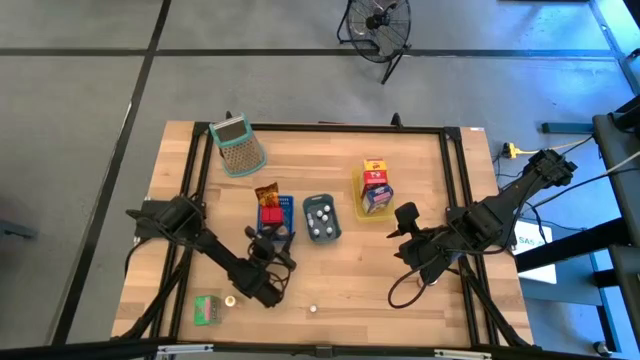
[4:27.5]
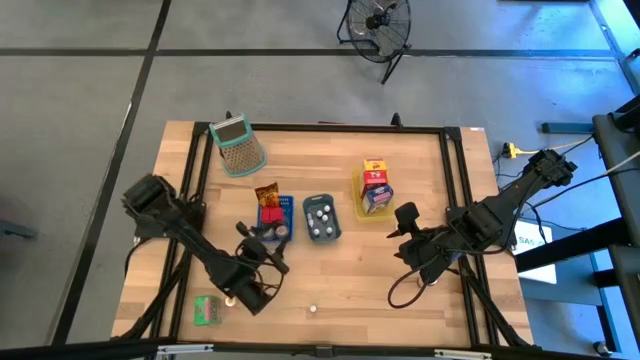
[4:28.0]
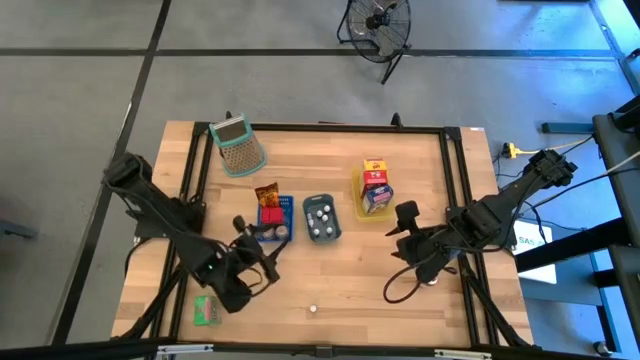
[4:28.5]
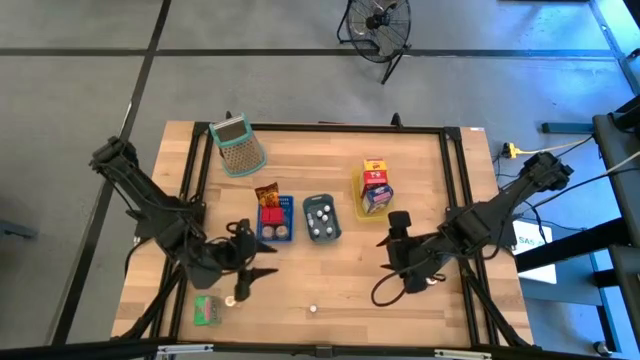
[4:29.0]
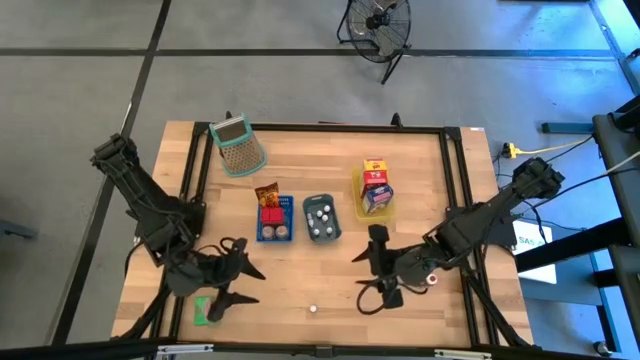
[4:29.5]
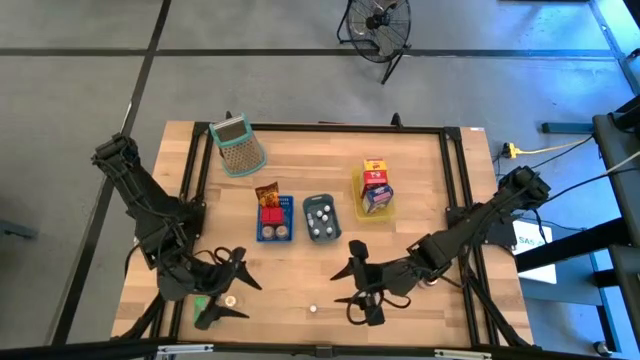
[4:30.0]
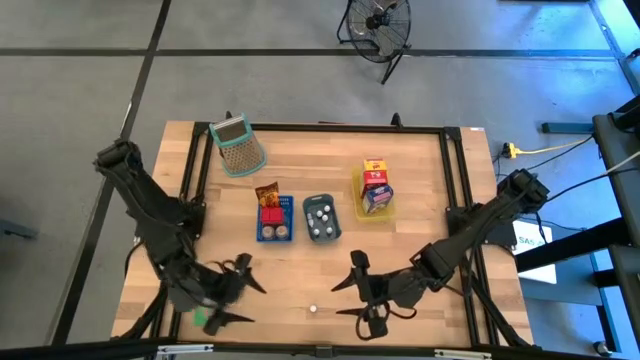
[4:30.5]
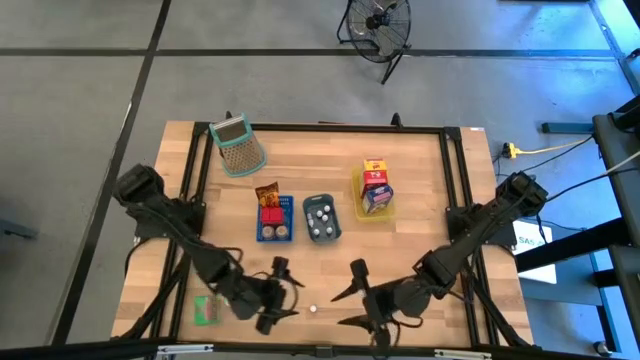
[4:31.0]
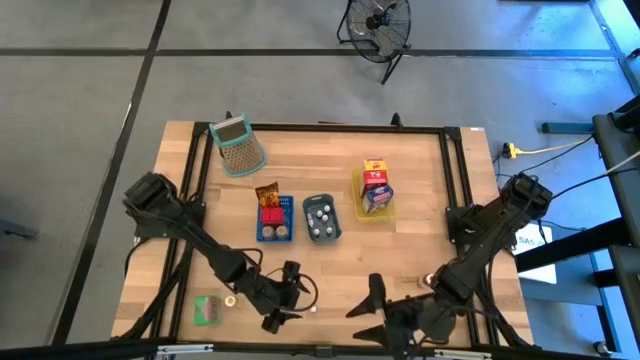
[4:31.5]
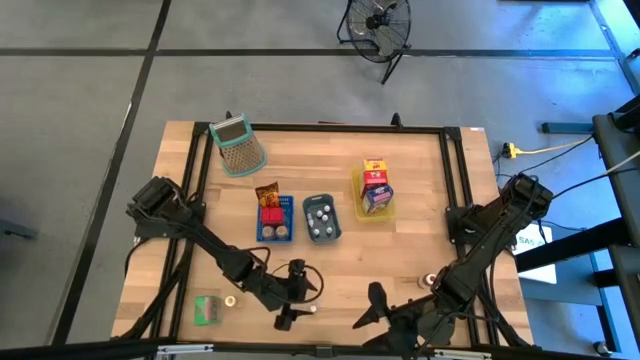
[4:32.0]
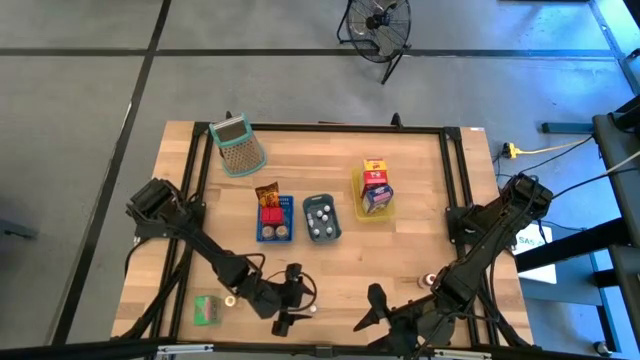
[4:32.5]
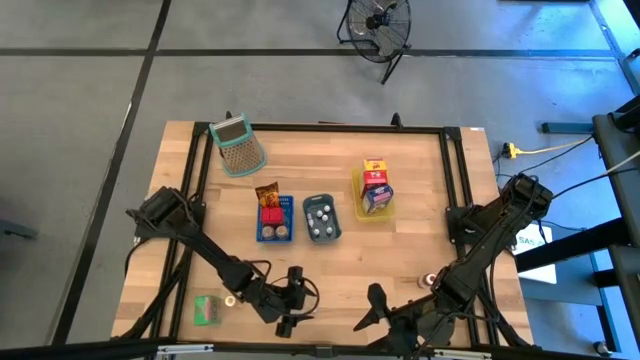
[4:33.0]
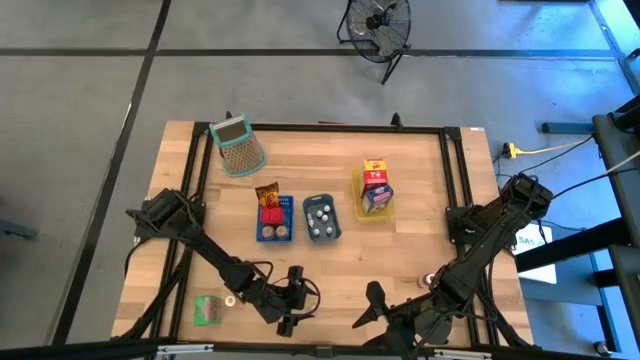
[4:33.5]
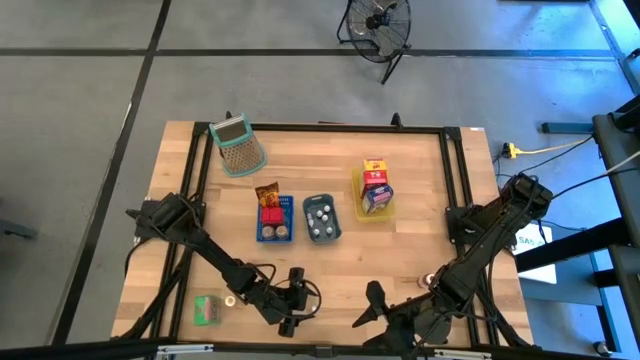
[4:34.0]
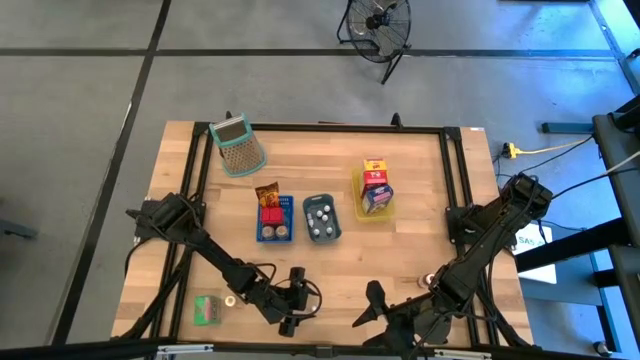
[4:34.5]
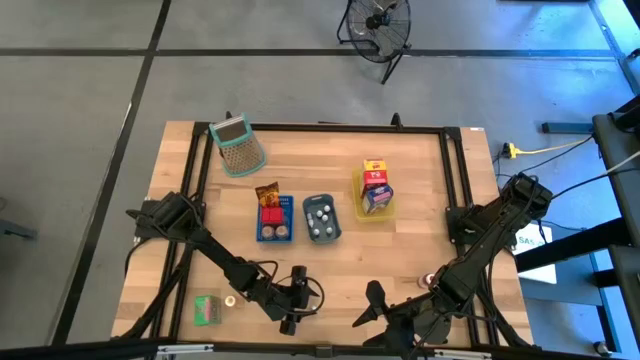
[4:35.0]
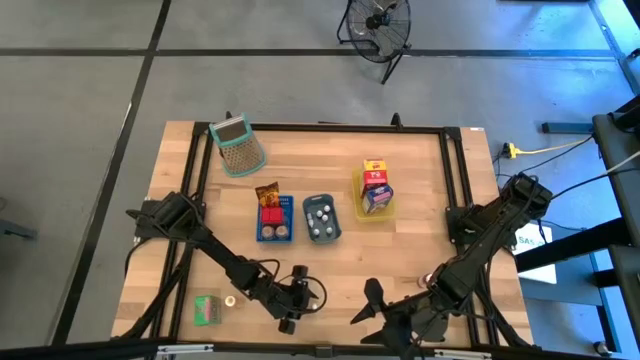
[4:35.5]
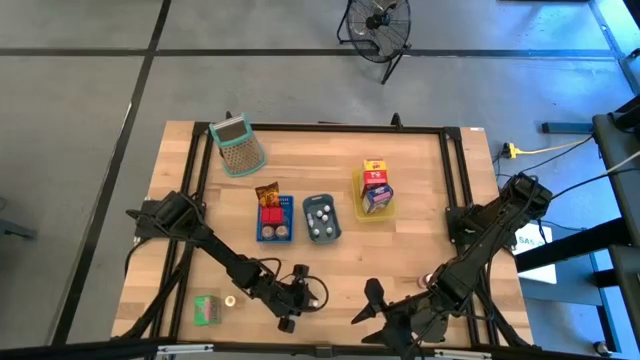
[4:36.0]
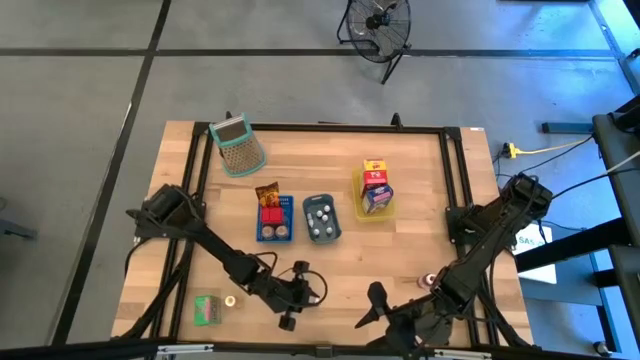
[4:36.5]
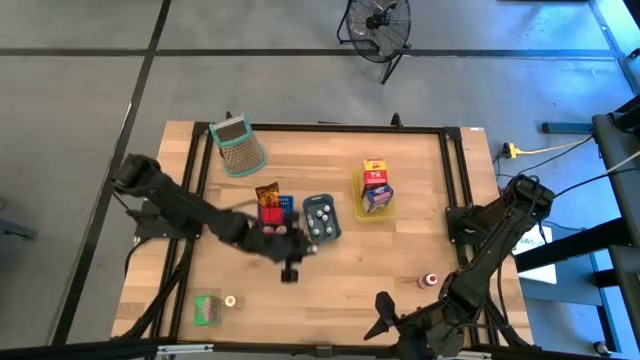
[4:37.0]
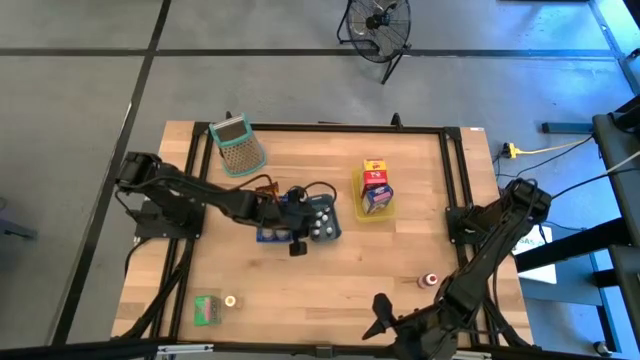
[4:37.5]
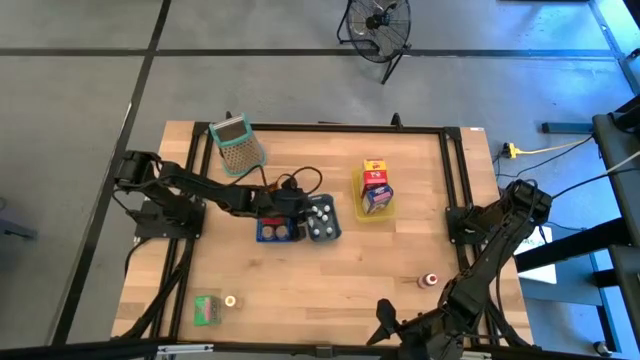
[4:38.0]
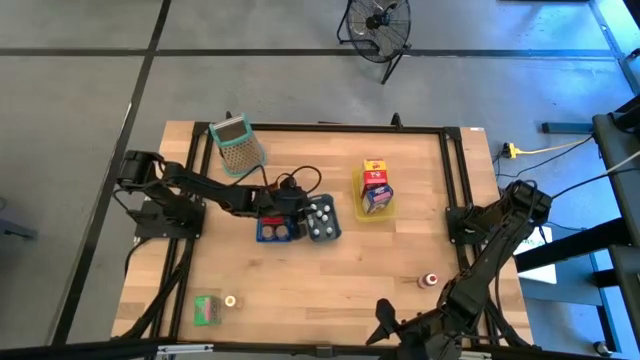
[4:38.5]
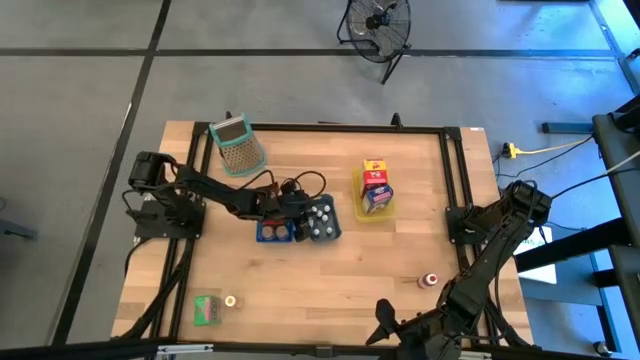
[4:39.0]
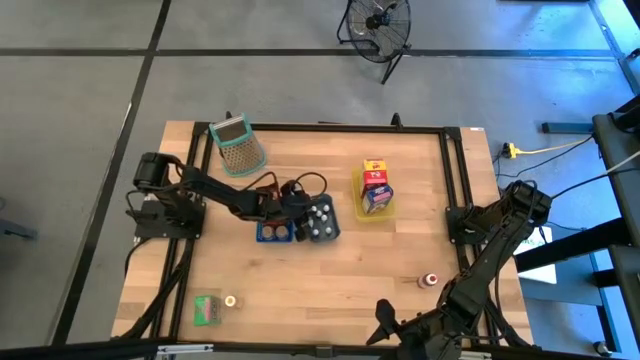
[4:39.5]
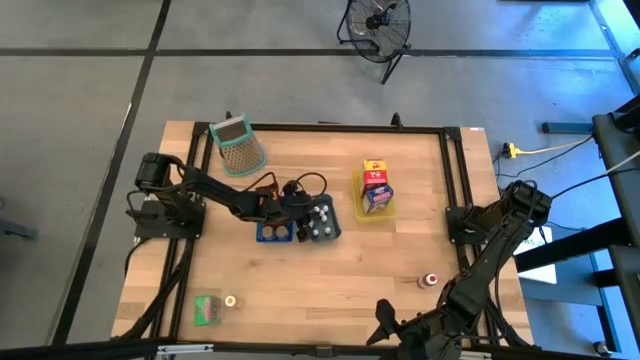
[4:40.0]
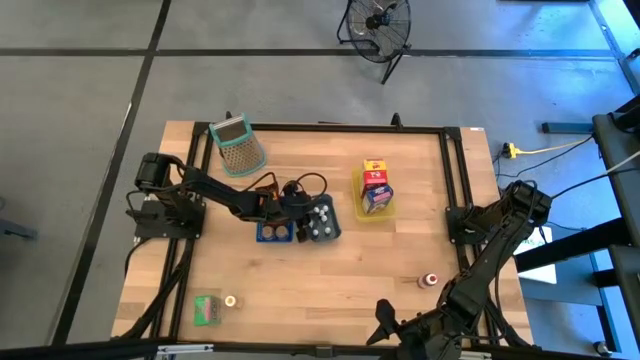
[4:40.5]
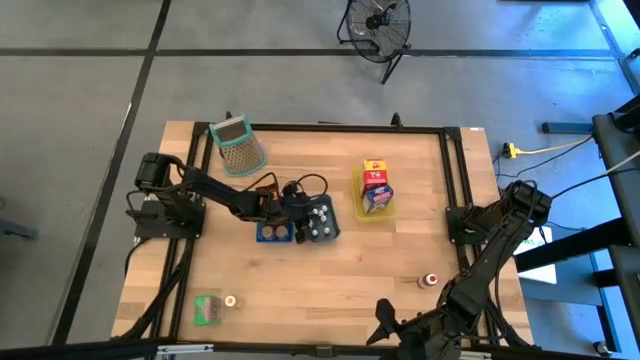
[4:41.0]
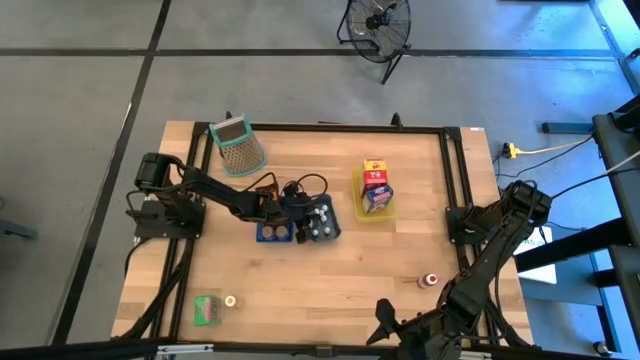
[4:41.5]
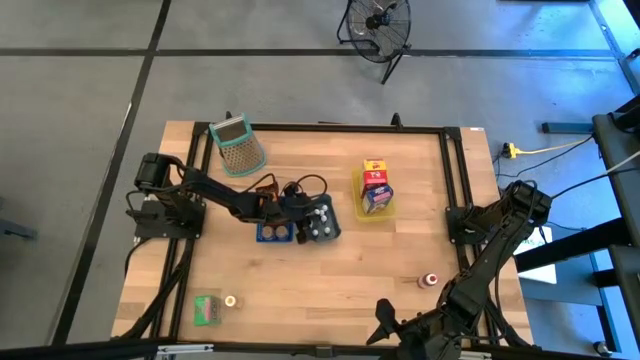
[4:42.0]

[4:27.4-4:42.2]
Task: Pick & Place Kitchen Items
Put the small food coloring bottle into the gray bin

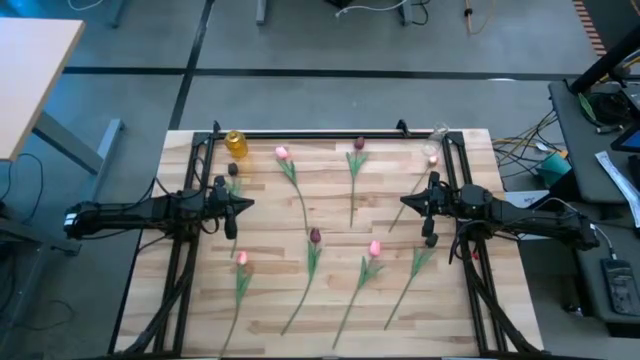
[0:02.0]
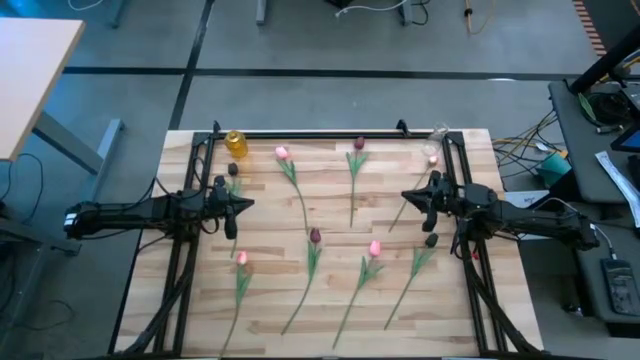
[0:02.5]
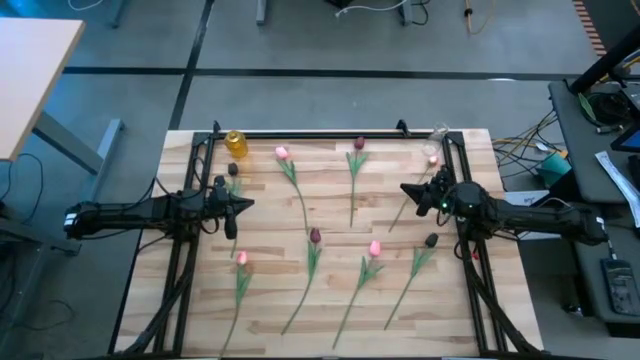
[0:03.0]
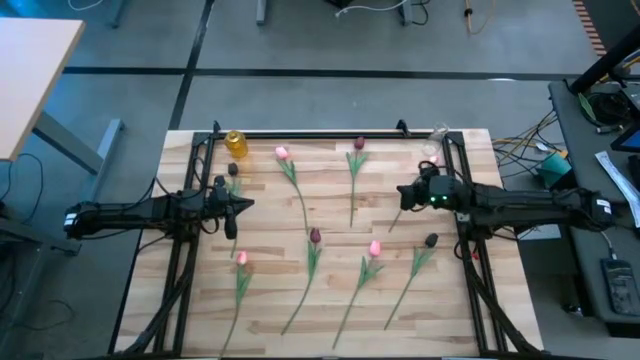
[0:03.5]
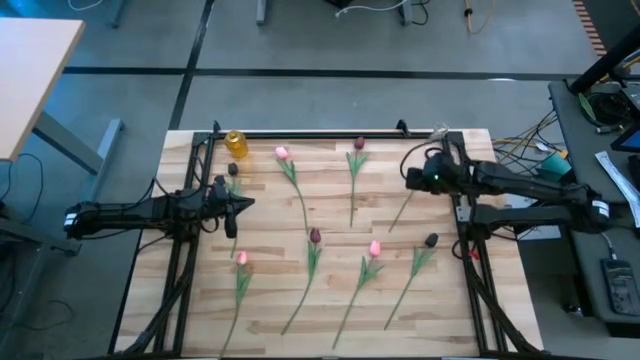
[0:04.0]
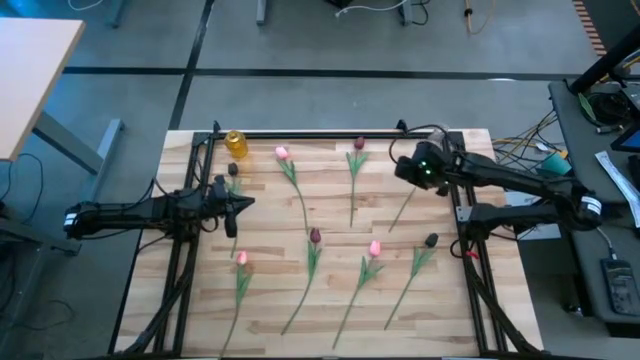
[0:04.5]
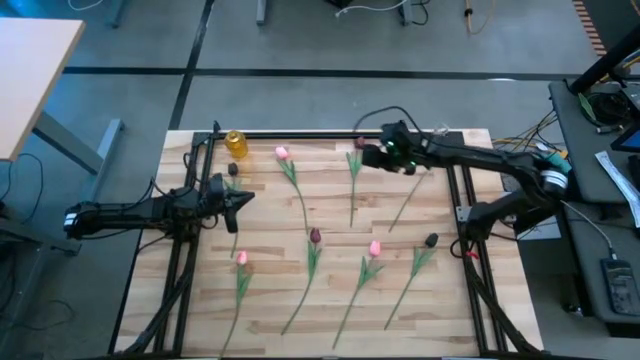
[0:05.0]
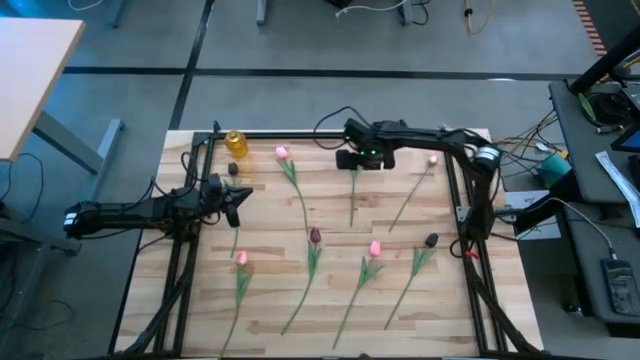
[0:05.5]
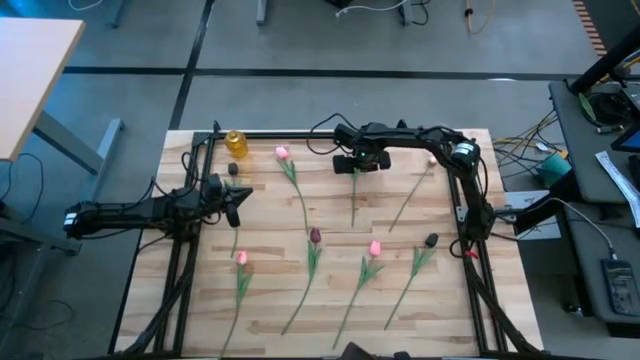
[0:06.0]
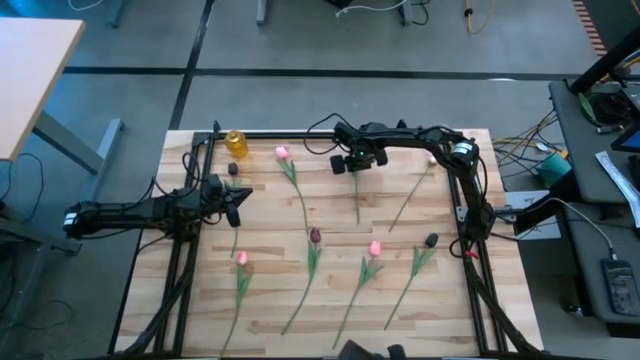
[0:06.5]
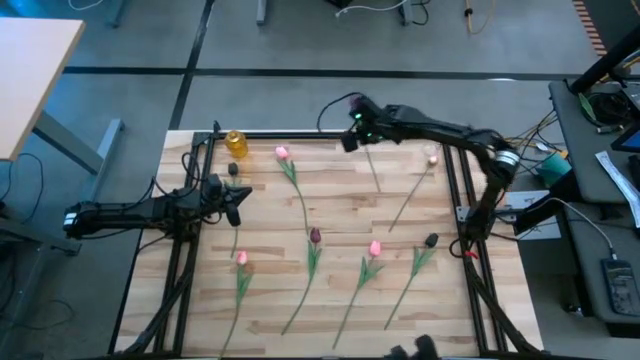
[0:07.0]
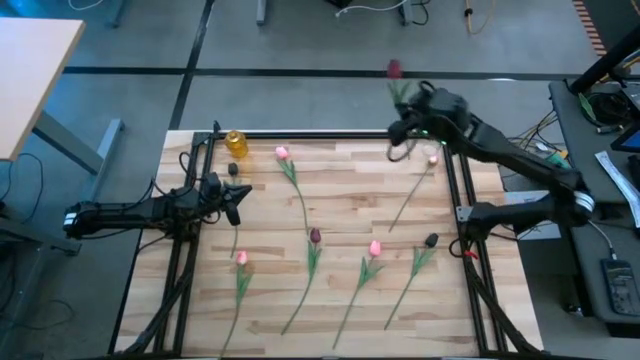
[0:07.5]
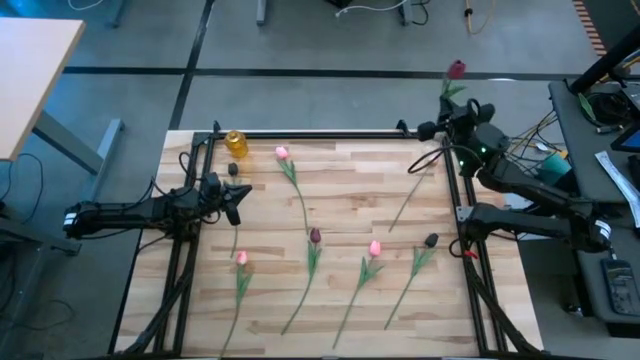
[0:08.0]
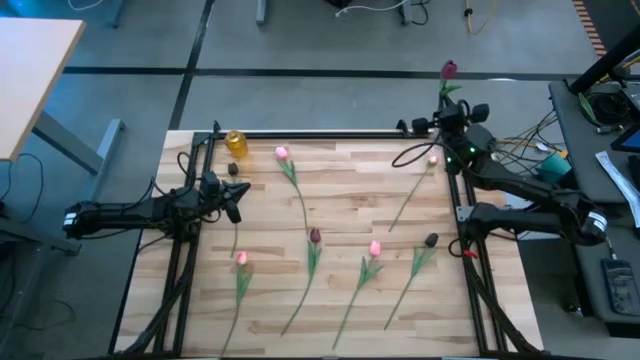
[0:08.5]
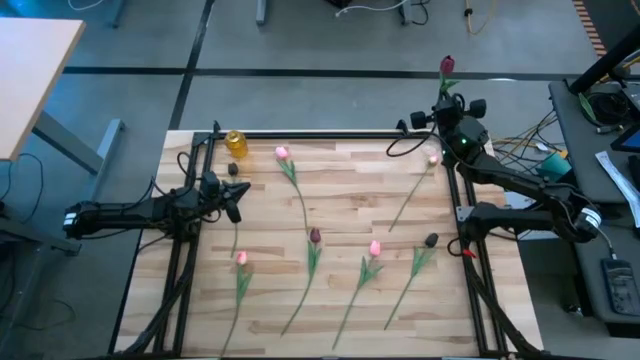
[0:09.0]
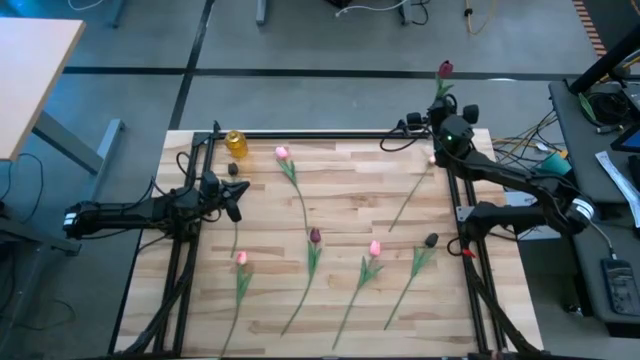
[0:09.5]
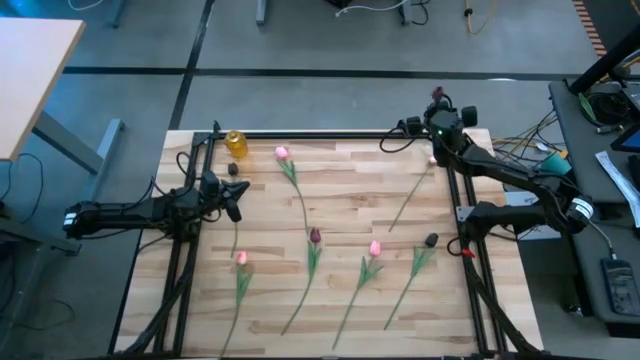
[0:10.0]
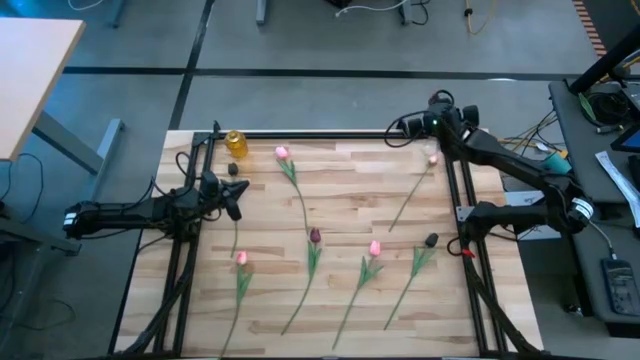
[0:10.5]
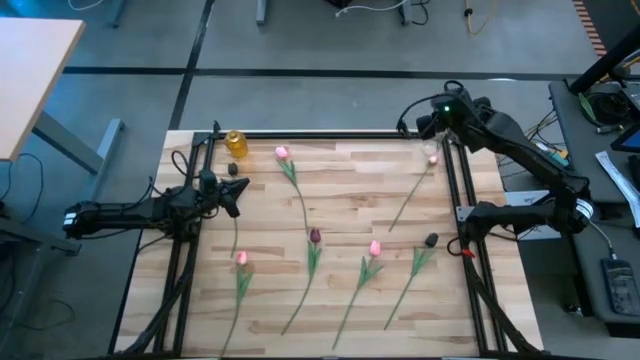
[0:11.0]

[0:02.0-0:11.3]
Task: Sort flowers into vase by color
Put the dark red tulip into the transparent vase
